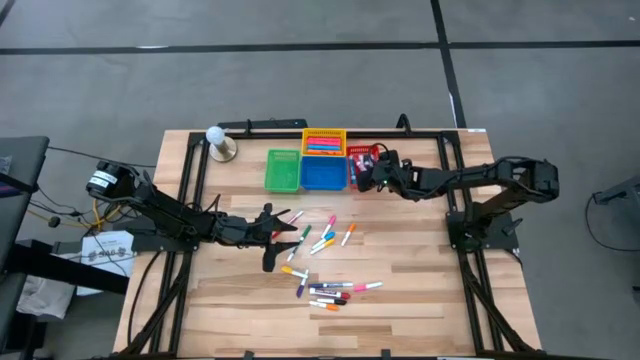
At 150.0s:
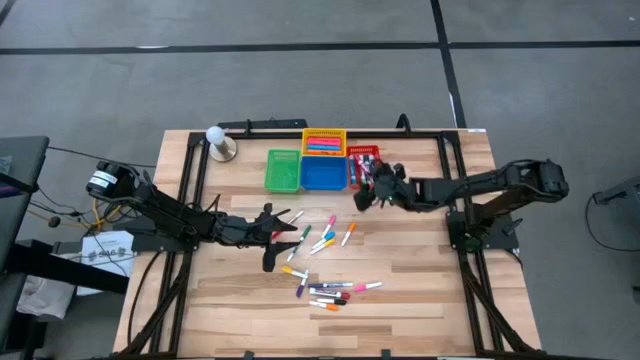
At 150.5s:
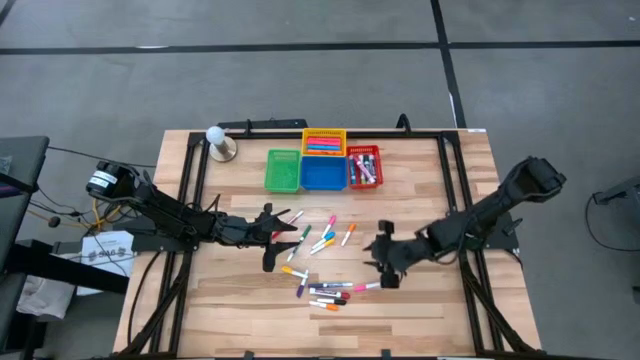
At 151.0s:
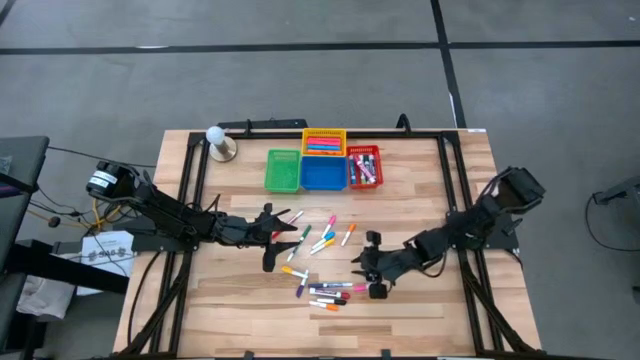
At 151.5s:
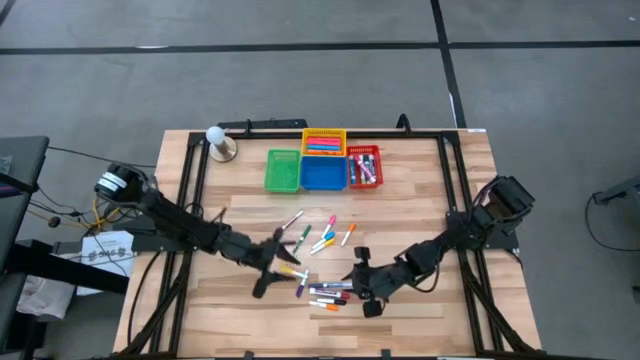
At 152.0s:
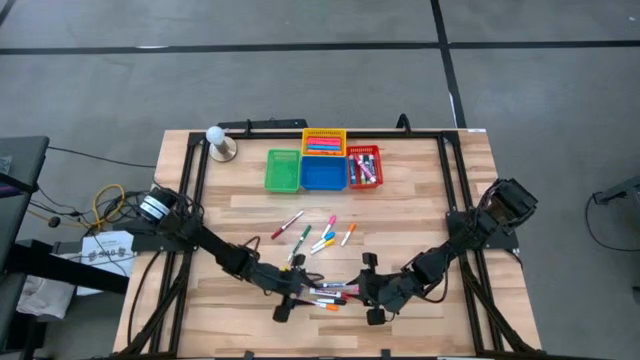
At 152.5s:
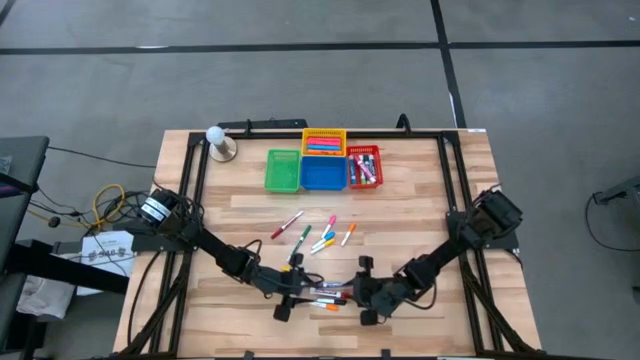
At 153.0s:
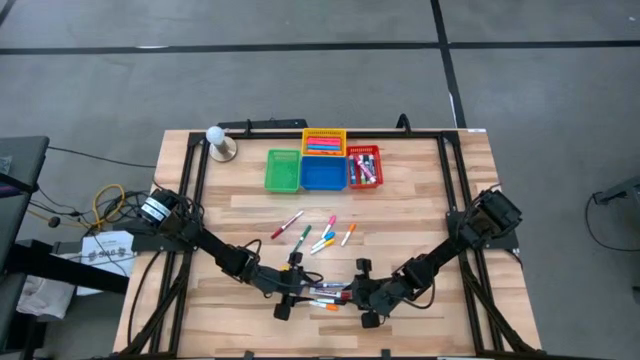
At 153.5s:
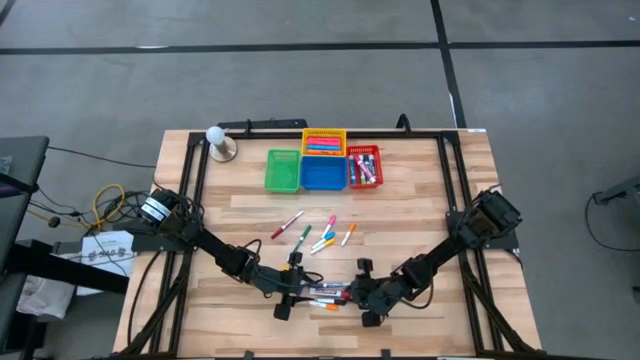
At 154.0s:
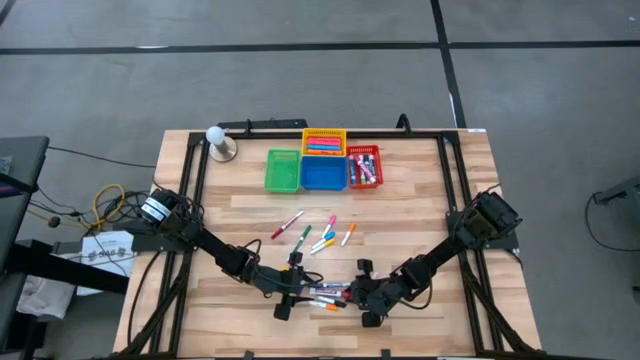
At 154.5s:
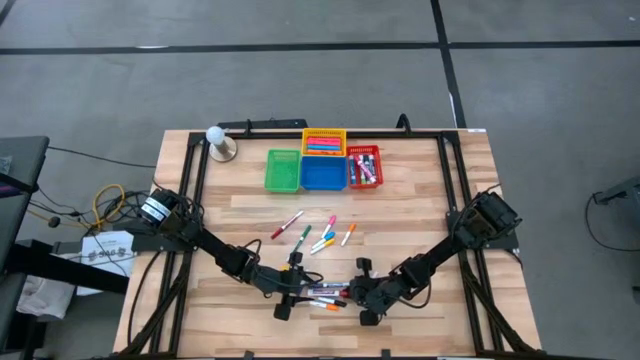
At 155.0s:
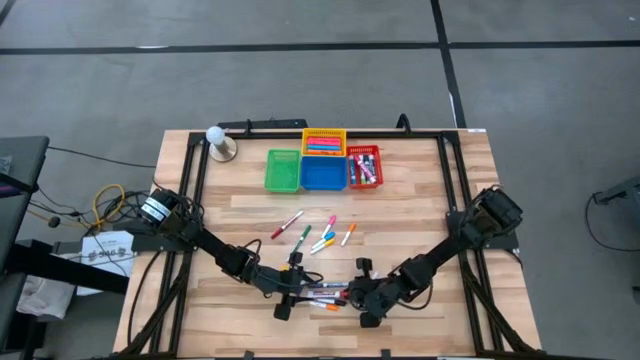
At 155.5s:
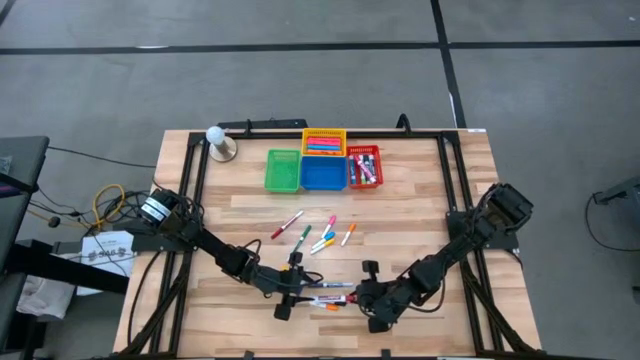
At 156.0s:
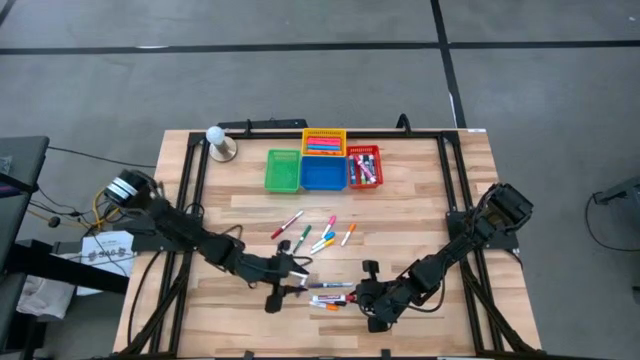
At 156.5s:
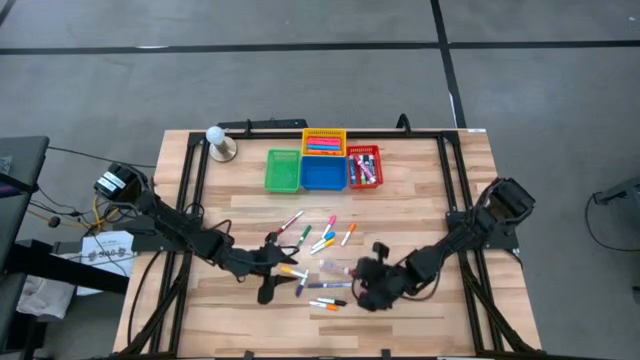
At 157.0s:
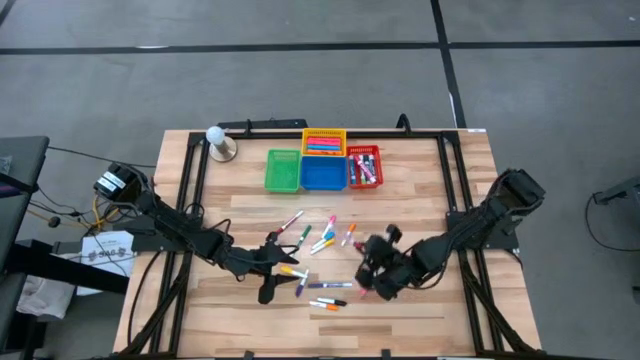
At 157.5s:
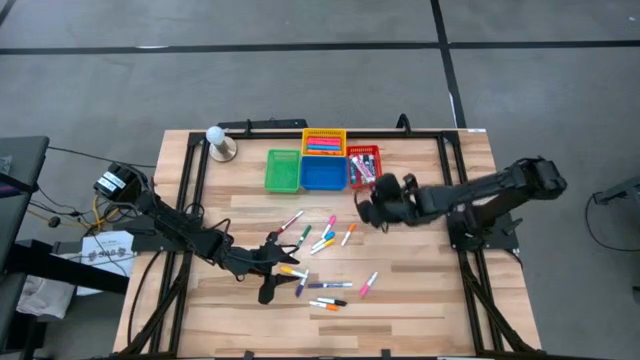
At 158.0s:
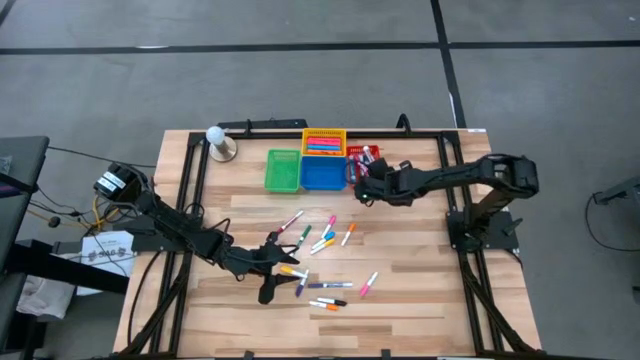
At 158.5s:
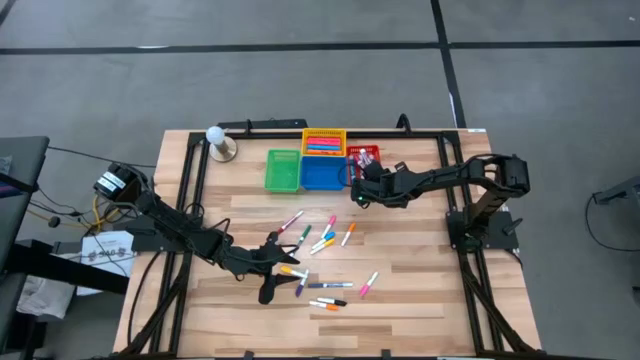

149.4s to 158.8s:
Task: Pick & Place Markers
Put the large red marker pen into the red bin

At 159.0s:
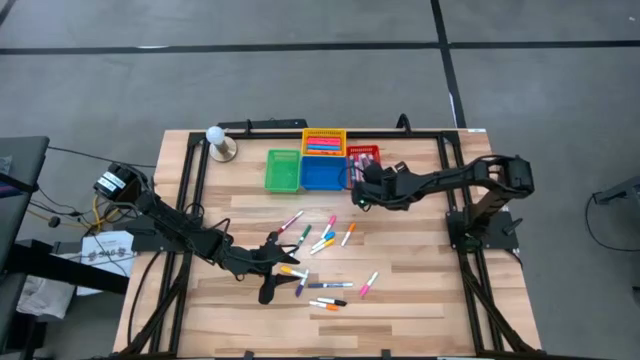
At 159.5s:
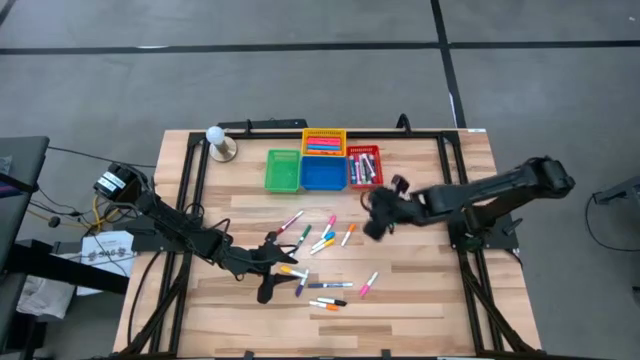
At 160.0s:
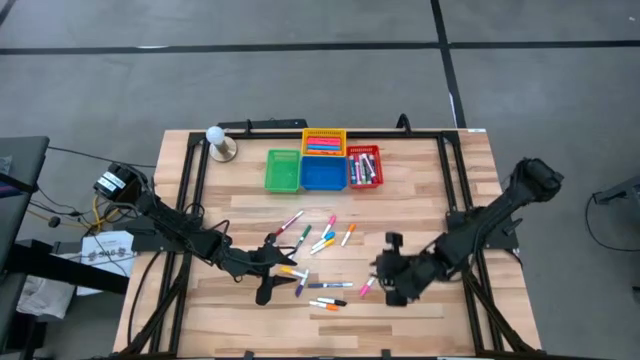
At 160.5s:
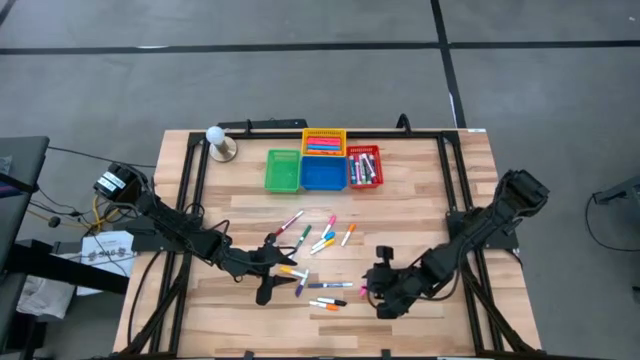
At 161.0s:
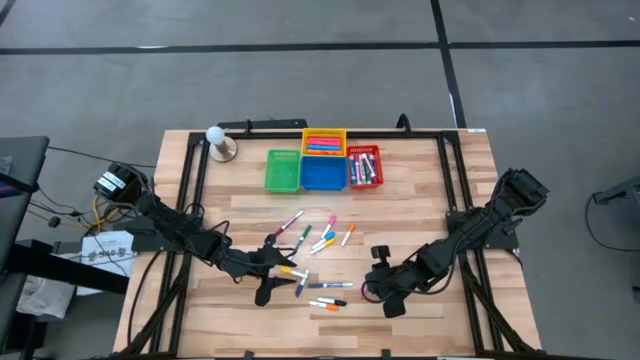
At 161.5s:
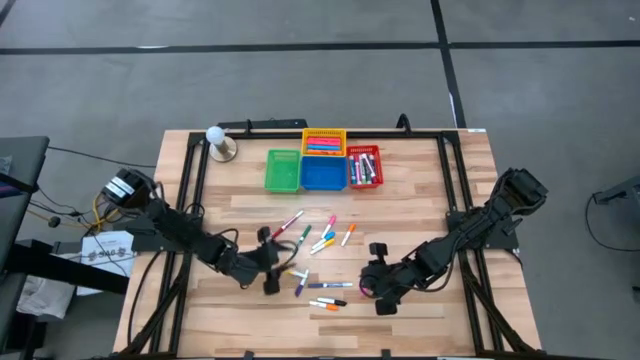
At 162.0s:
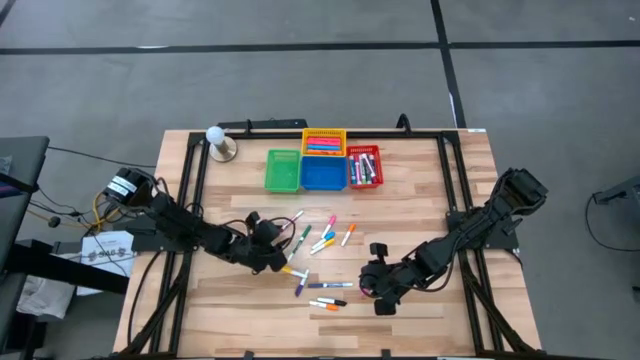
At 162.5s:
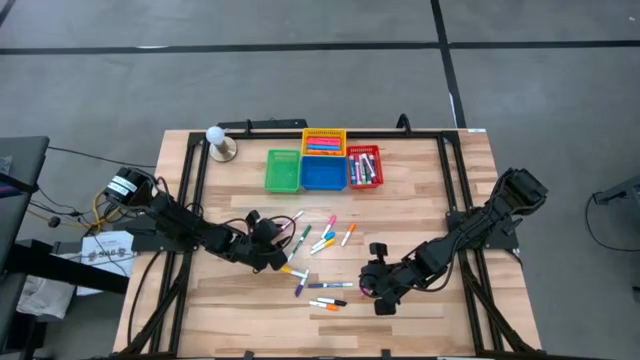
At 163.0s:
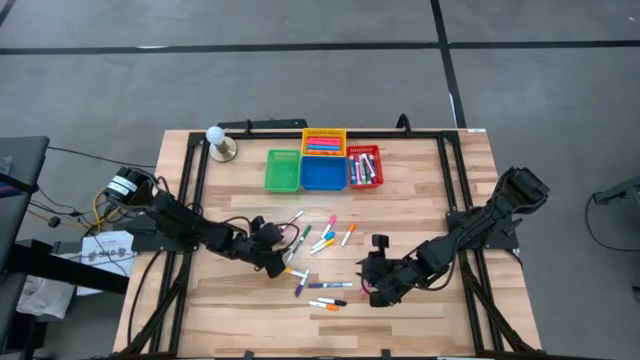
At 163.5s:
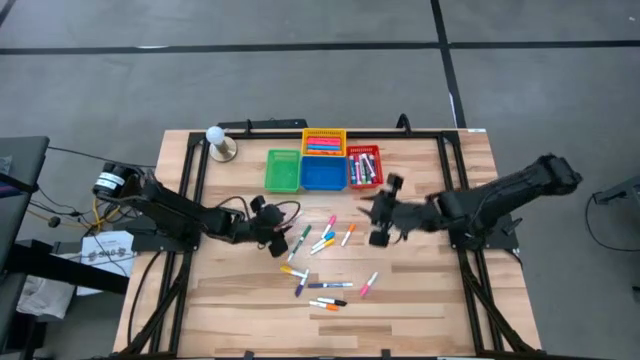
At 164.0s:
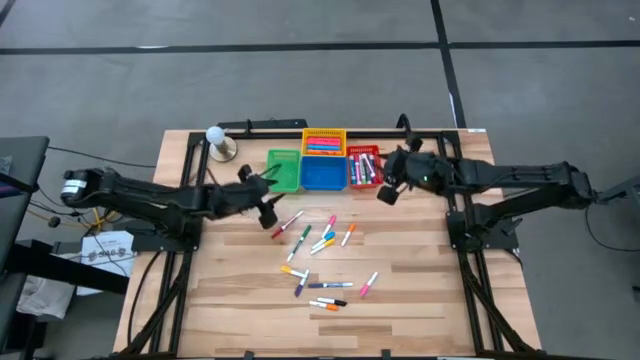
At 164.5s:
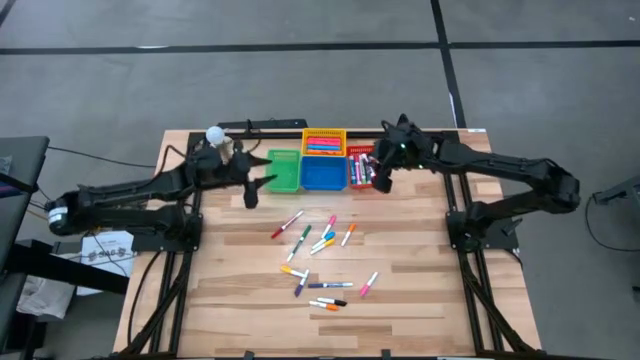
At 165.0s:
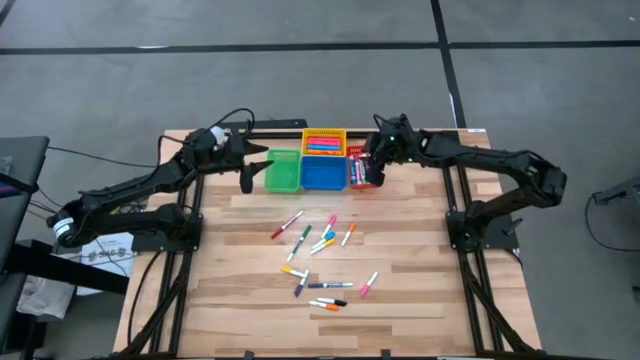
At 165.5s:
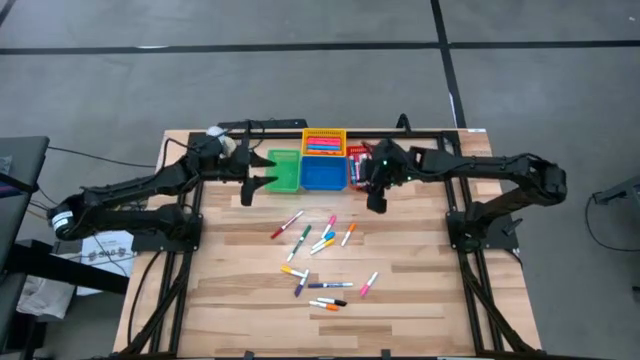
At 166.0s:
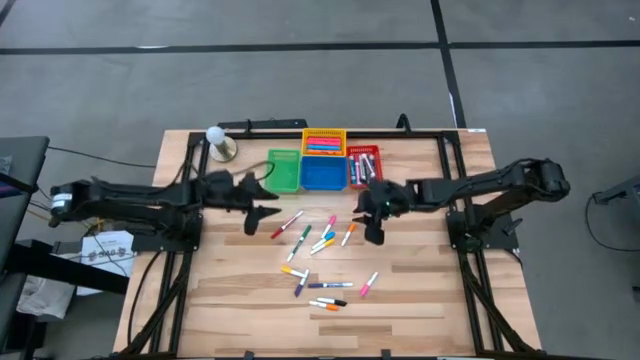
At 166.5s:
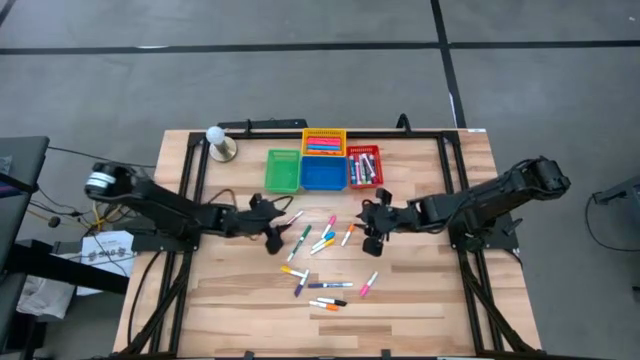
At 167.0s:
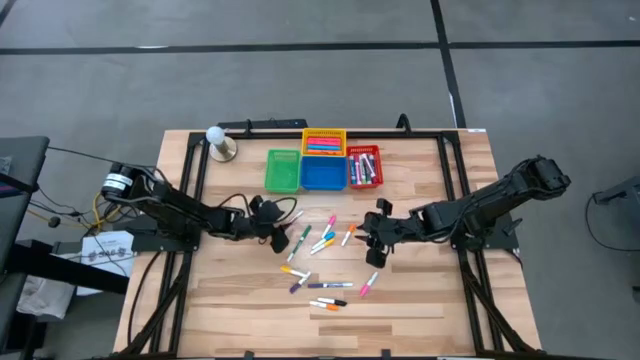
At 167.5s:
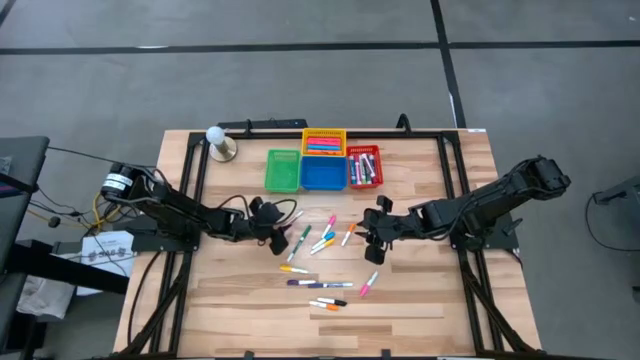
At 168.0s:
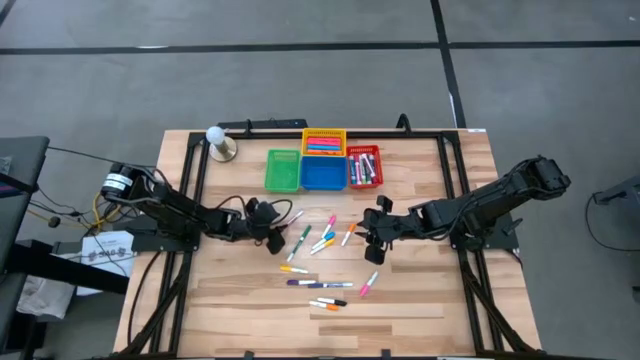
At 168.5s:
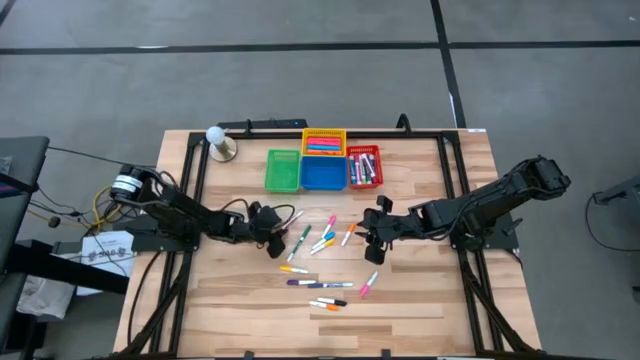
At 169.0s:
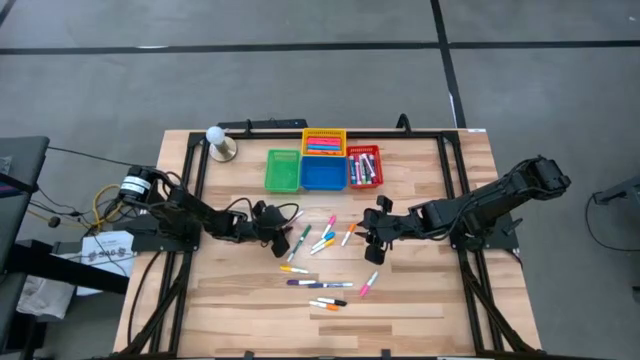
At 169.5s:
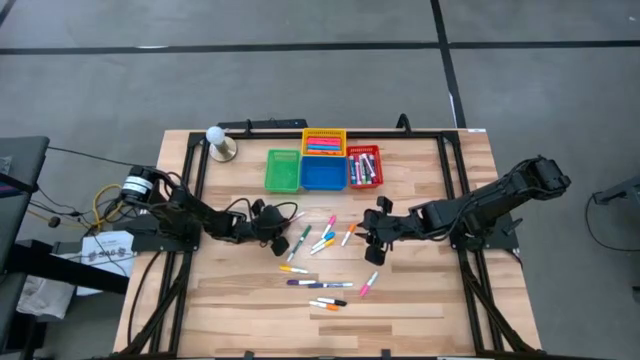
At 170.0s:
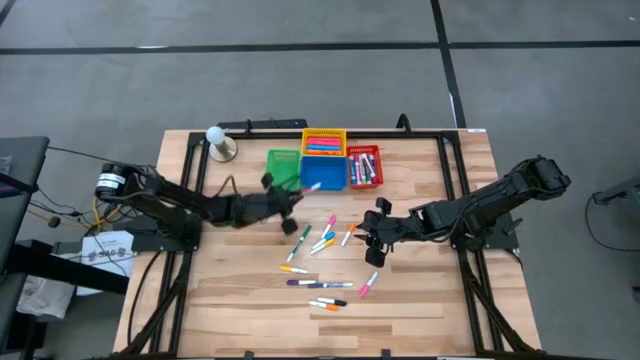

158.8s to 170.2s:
Put the small red marker pen into the blue bin
